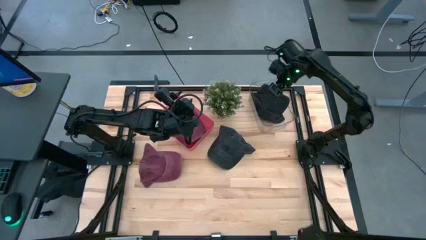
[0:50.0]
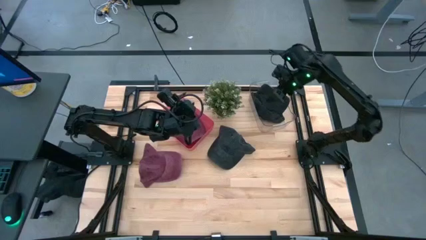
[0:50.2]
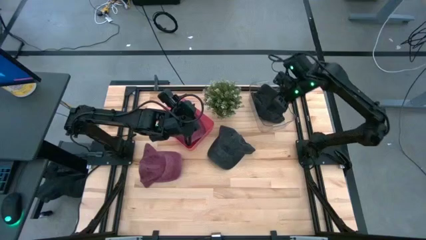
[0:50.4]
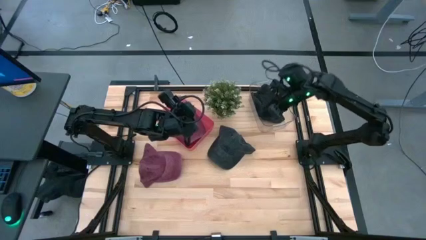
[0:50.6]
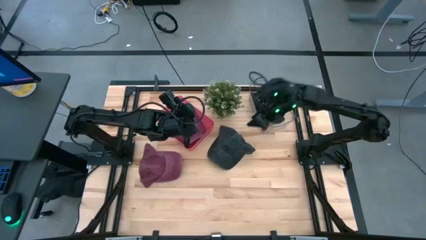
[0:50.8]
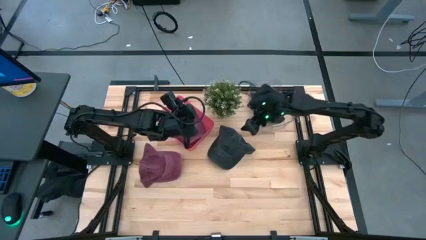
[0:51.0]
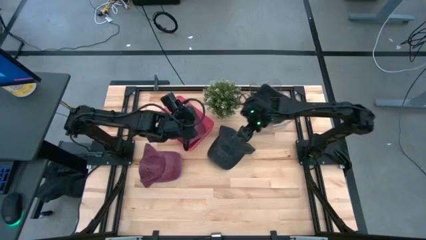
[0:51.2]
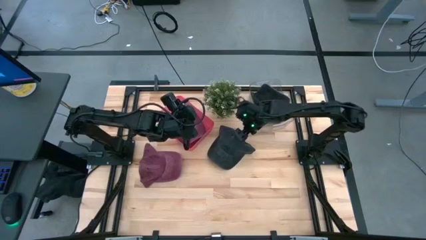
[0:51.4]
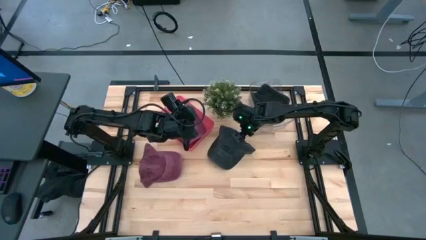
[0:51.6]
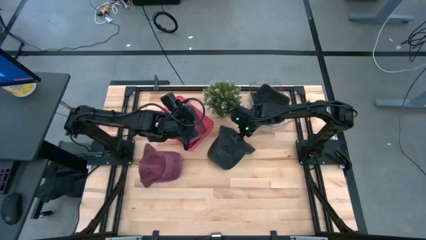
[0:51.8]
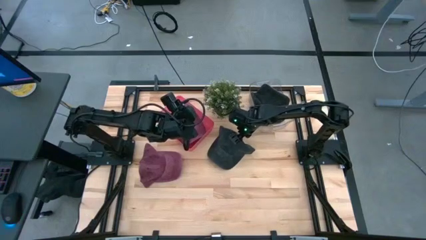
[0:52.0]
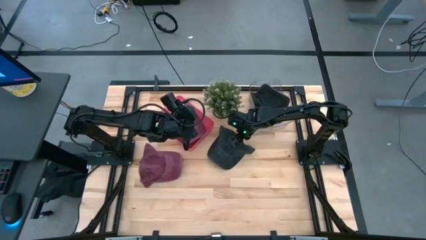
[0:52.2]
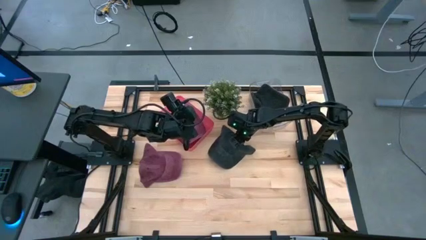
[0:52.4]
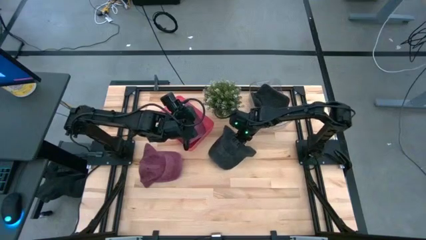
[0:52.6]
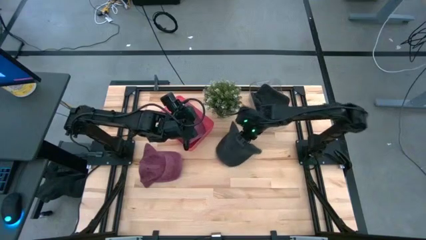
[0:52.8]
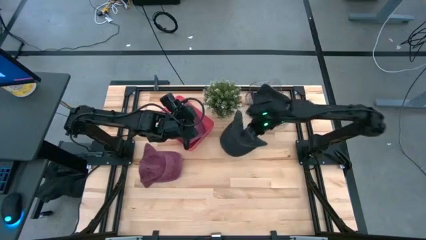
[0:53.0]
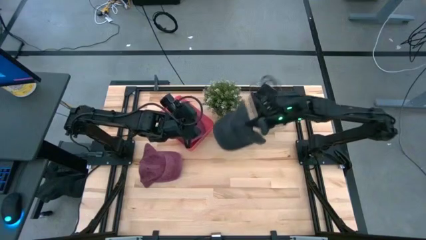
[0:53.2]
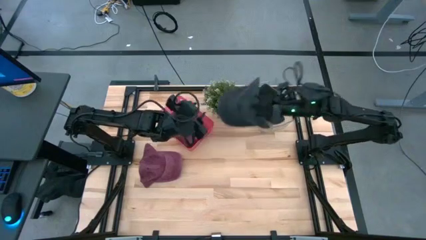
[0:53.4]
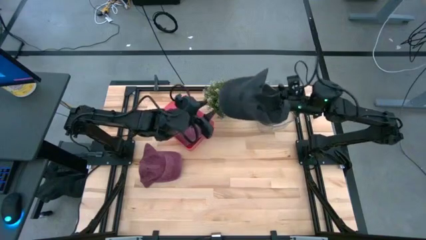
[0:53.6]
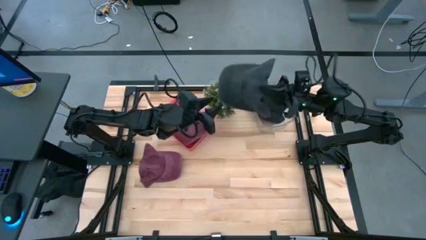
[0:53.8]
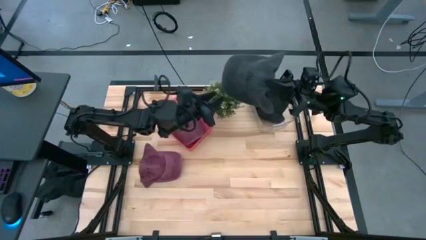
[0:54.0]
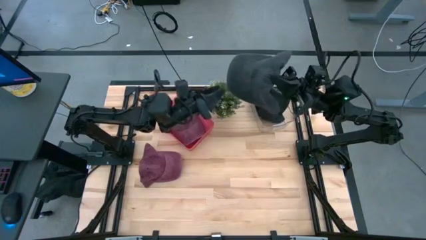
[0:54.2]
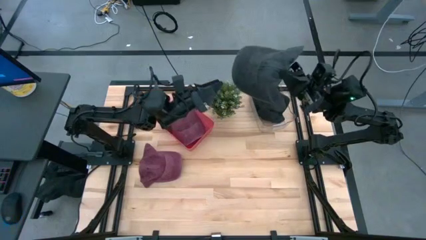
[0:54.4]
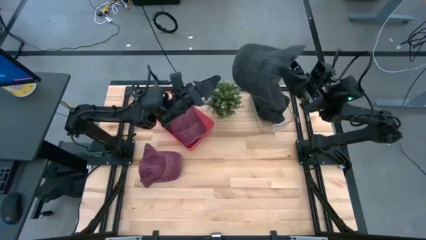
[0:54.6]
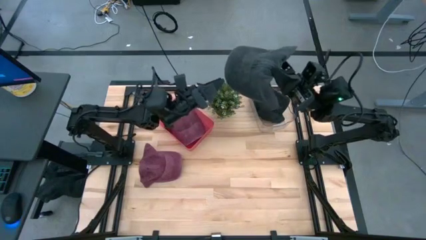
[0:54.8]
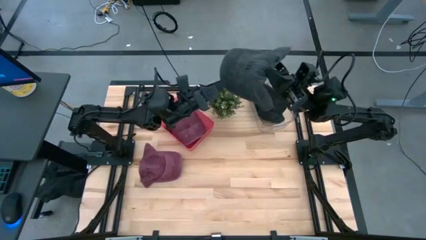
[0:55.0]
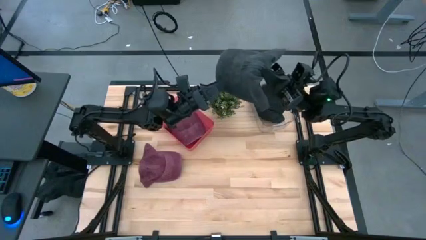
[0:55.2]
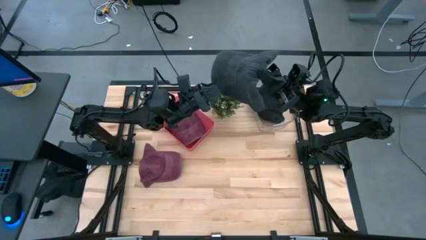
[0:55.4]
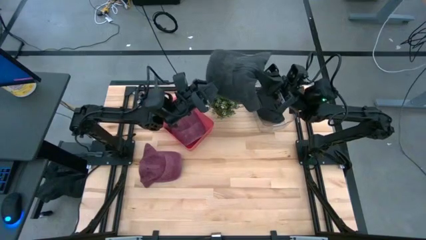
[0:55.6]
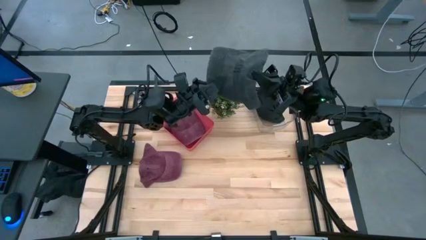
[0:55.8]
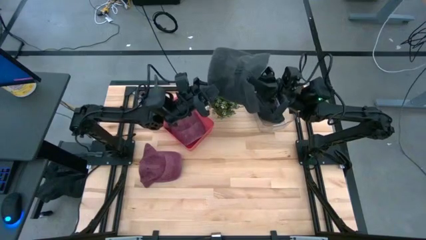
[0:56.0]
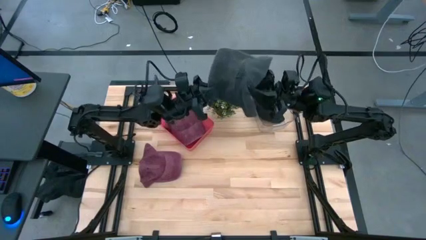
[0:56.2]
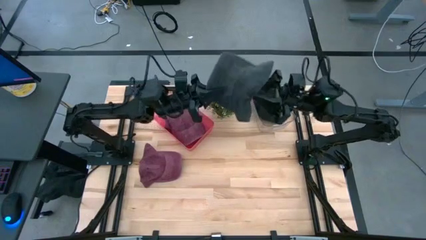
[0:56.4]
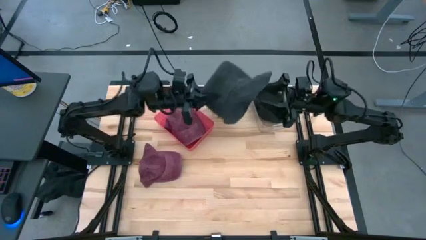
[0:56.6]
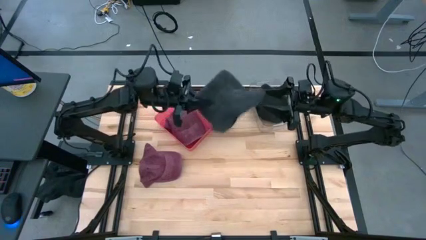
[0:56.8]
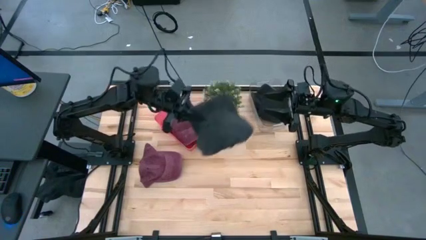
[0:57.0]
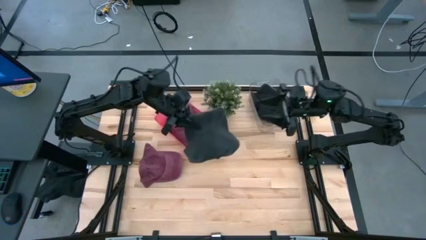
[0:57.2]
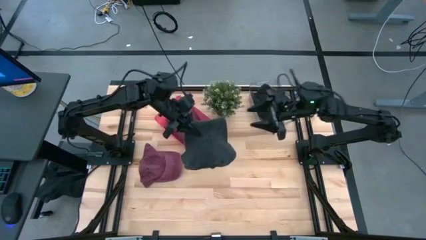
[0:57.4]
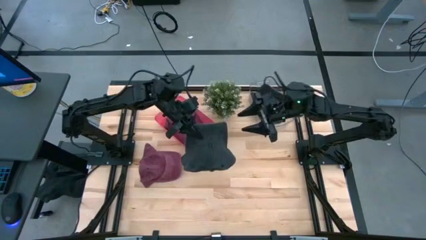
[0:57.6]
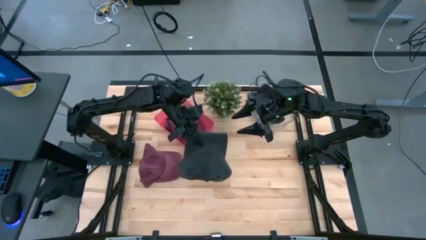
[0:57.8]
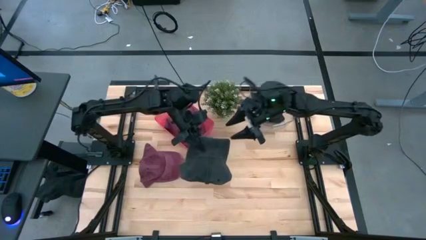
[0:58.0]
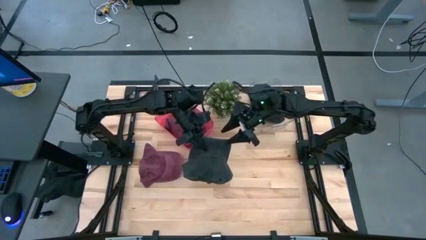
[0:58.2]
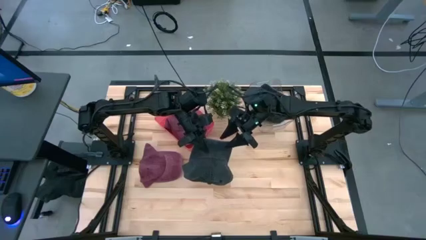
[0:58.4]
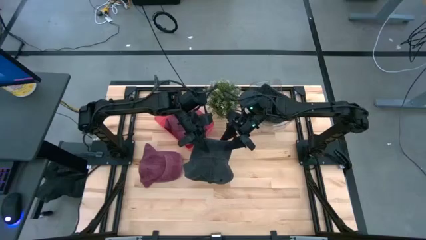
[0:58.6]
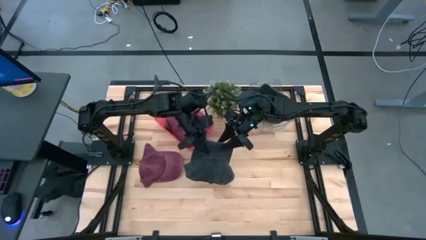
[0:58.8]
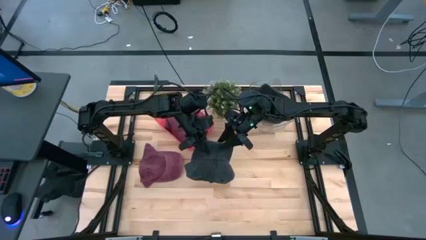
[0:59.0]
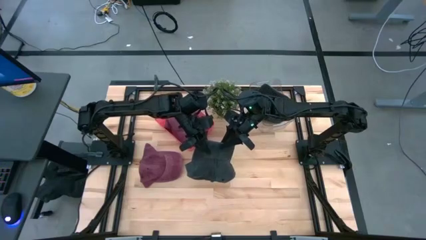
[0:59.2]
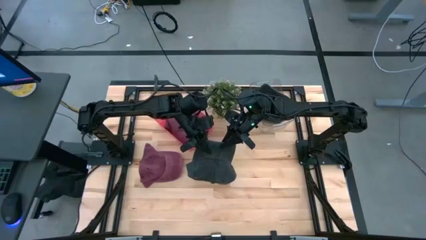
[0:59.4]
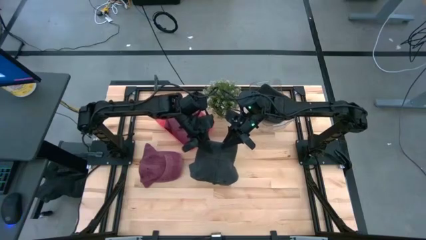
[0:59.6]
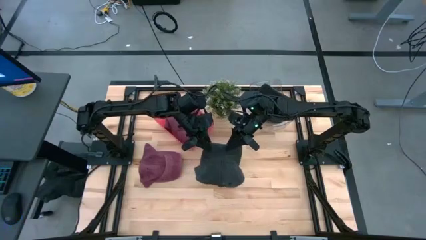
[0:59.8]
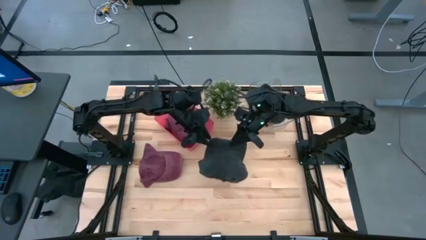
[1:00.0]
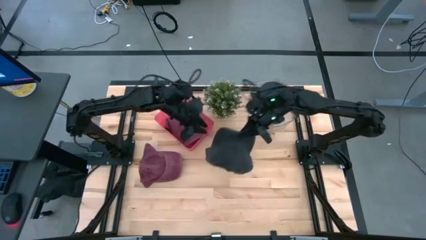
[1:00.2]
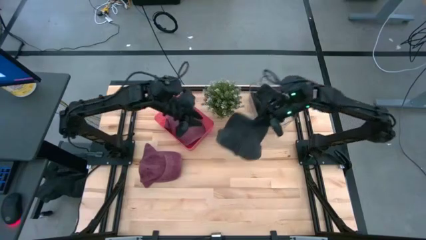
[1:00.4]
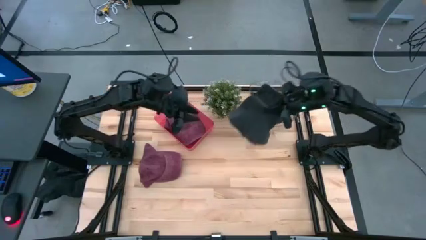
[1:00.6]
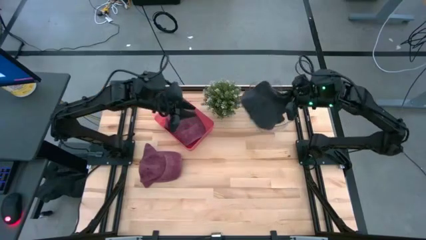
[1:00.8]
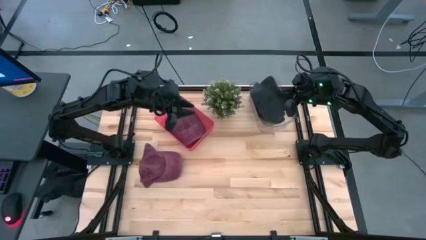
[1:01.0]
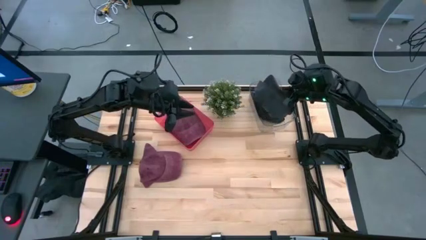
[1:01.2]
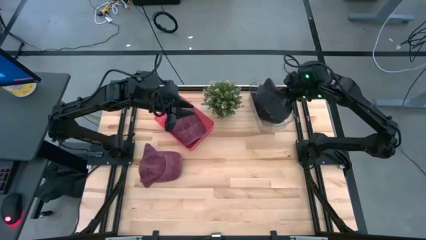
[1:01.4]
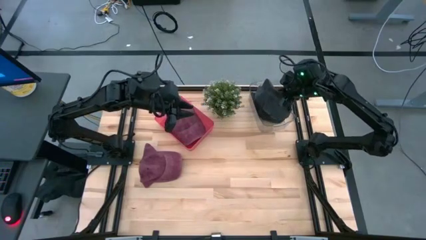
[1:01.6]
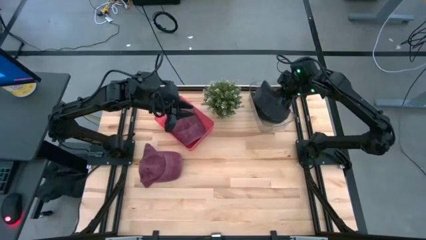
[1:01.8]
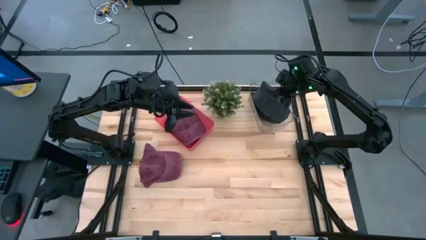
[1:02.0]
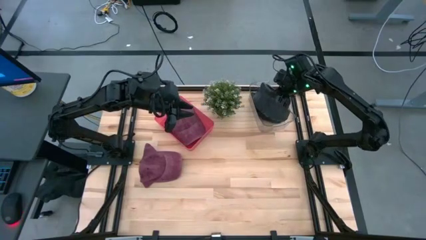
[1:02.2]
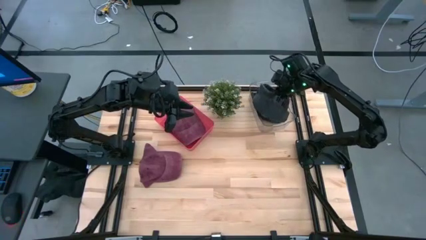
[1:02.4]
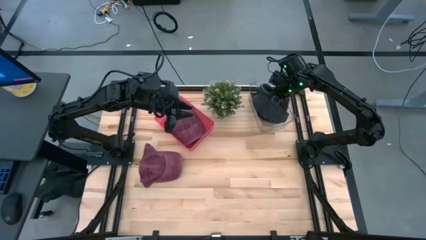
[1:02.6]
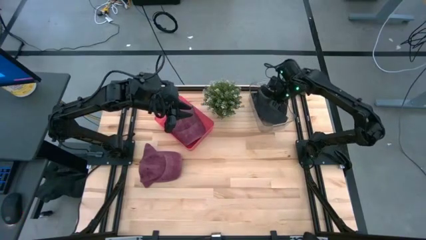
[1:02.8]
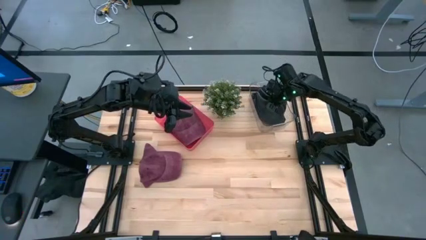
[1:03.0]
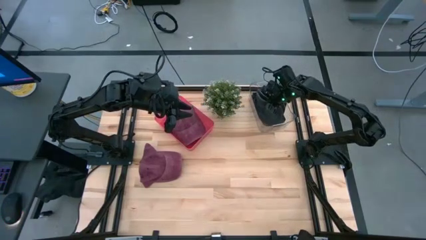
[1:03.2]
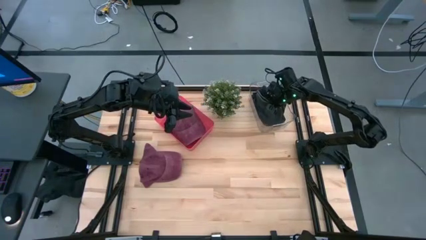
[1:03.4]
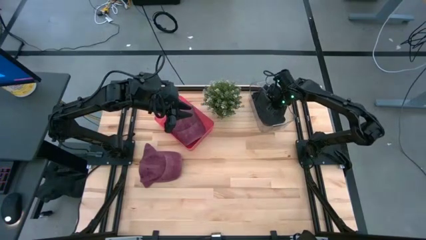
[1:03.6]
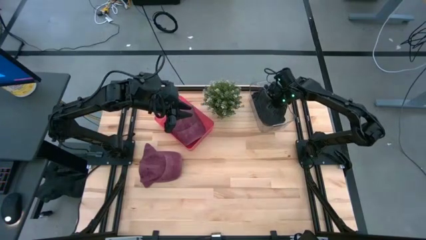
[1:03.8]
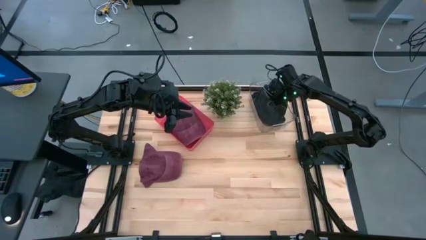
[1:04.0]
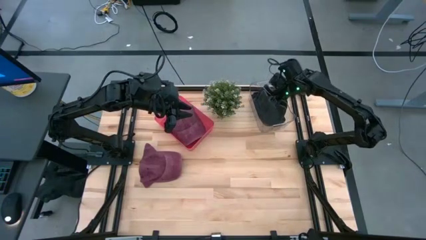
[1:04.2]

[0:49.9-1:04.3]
Task: Pick & Place hat
Put the black cap into the transparent bin
